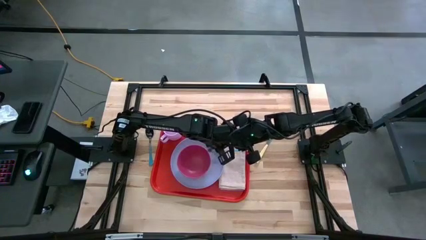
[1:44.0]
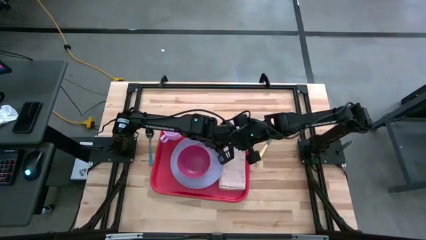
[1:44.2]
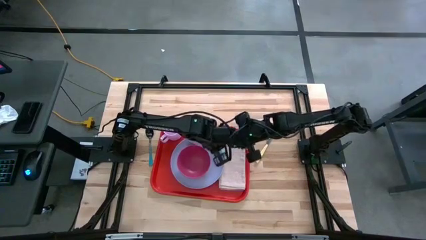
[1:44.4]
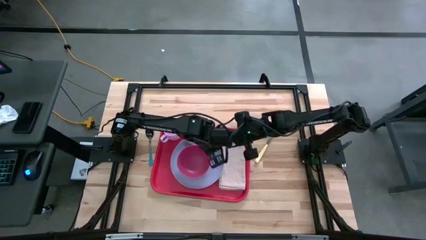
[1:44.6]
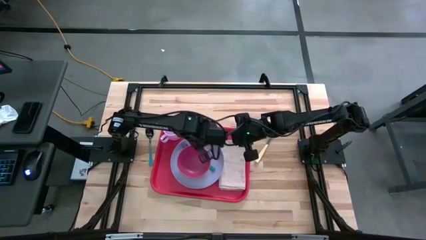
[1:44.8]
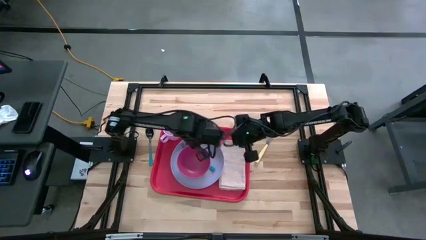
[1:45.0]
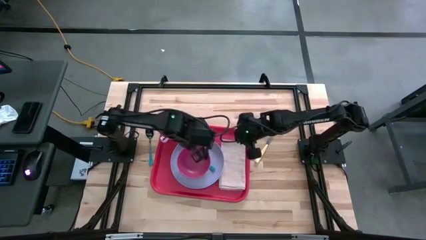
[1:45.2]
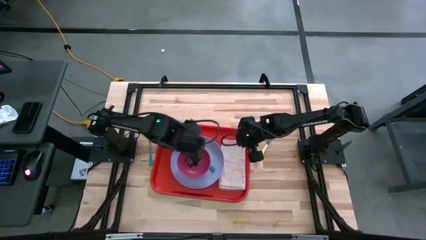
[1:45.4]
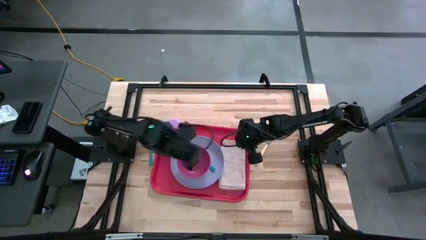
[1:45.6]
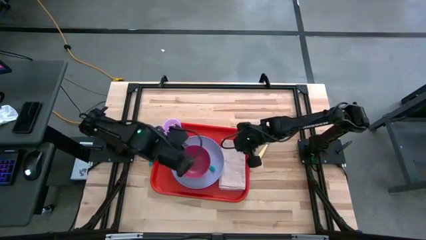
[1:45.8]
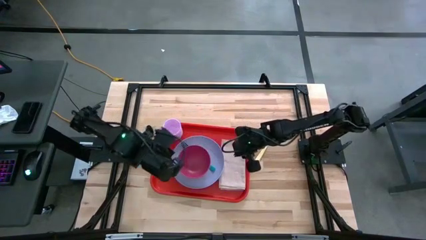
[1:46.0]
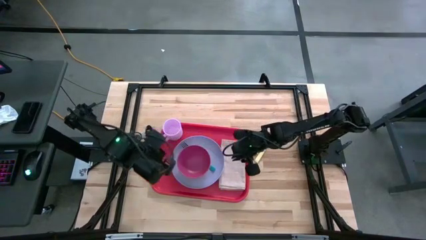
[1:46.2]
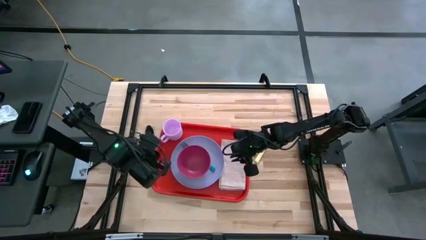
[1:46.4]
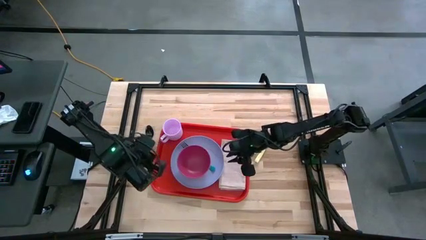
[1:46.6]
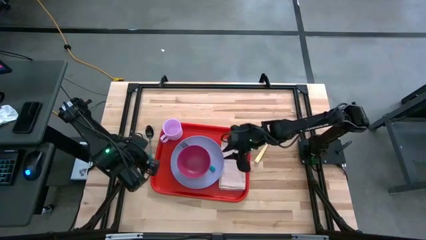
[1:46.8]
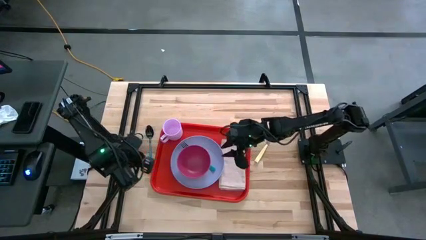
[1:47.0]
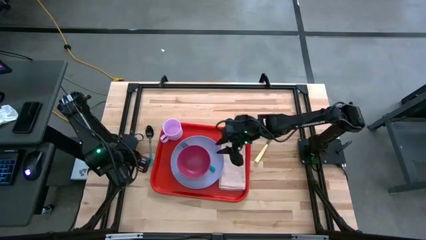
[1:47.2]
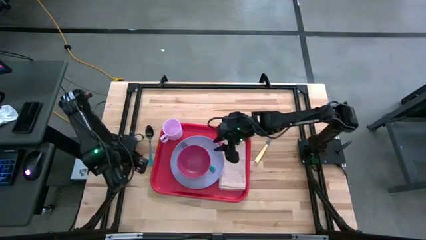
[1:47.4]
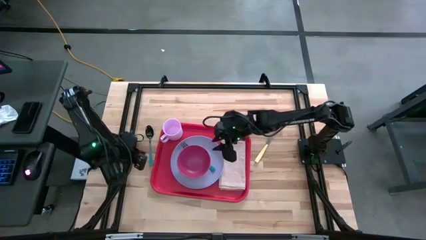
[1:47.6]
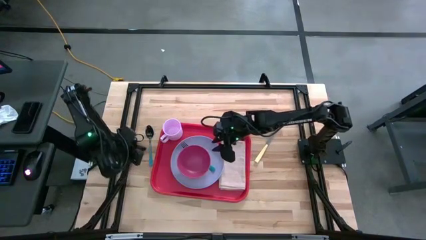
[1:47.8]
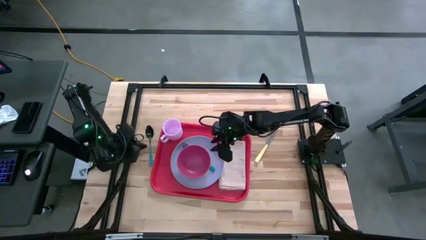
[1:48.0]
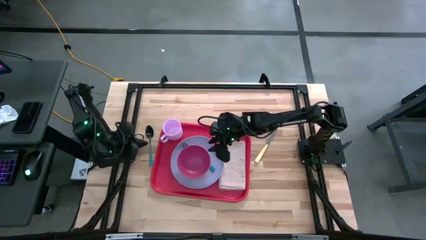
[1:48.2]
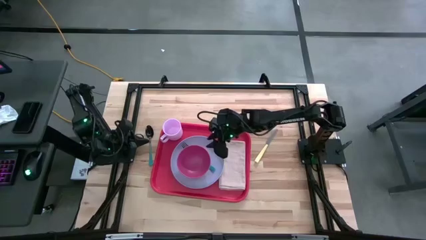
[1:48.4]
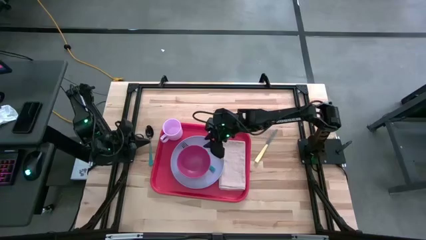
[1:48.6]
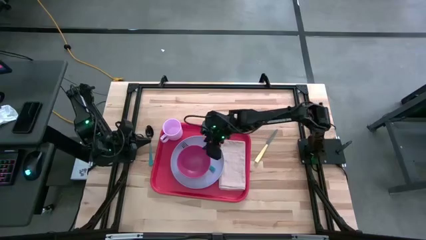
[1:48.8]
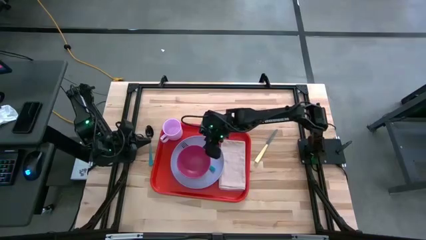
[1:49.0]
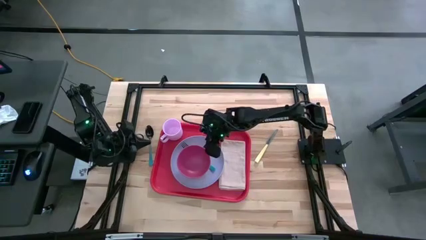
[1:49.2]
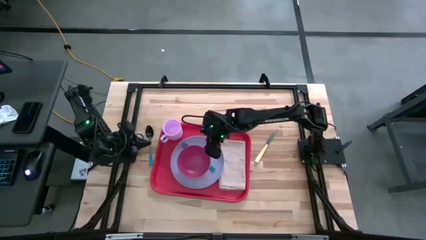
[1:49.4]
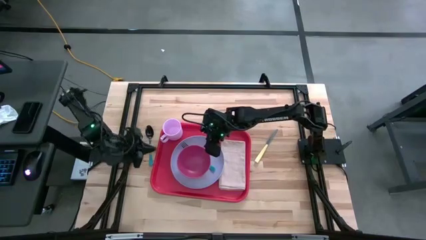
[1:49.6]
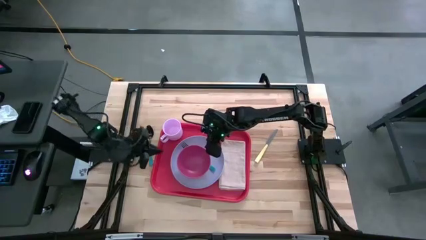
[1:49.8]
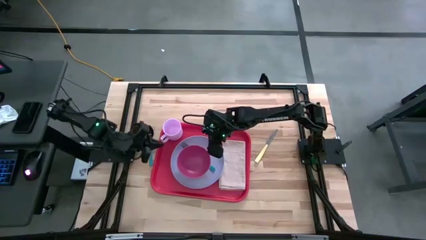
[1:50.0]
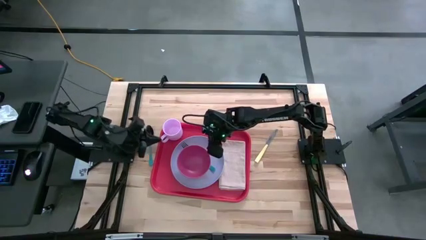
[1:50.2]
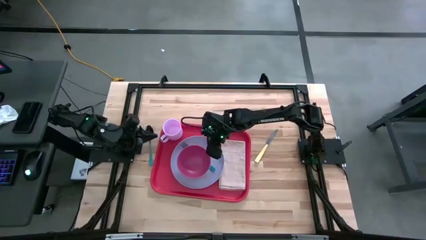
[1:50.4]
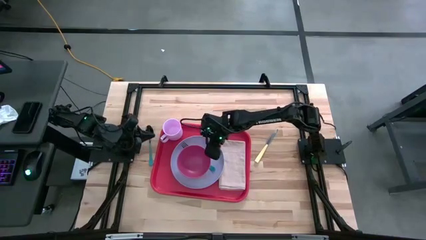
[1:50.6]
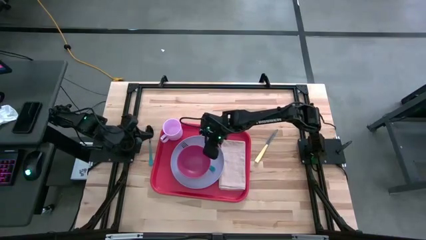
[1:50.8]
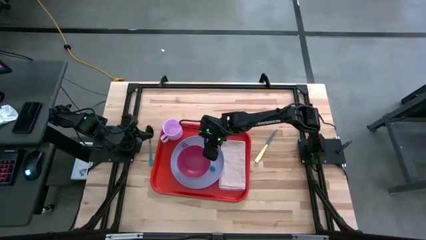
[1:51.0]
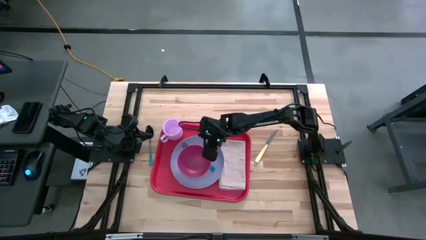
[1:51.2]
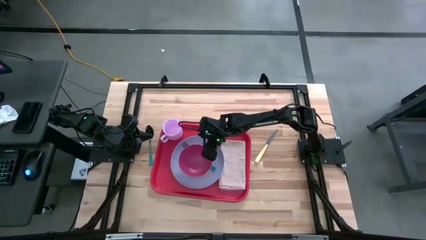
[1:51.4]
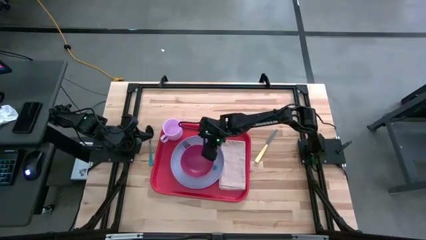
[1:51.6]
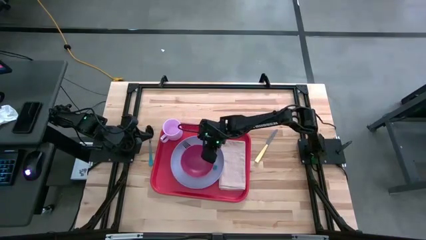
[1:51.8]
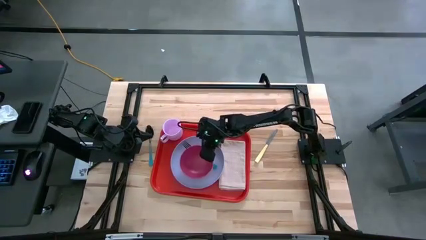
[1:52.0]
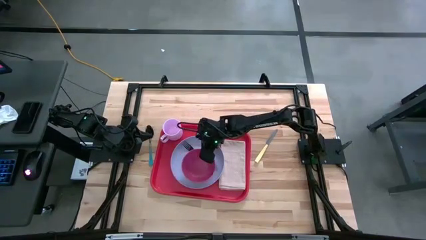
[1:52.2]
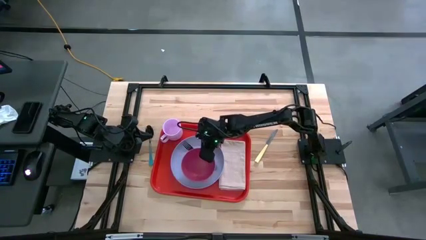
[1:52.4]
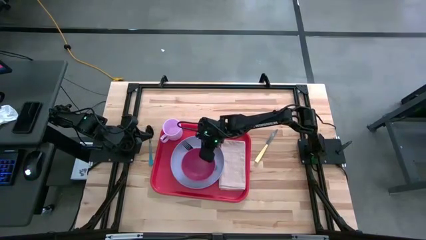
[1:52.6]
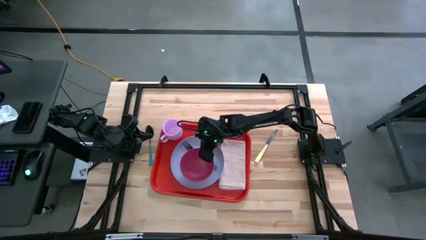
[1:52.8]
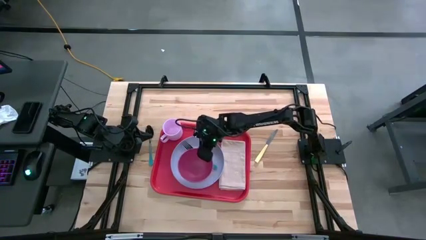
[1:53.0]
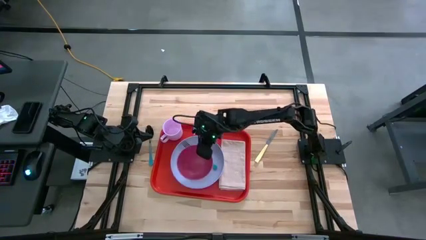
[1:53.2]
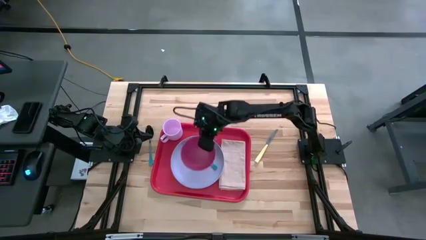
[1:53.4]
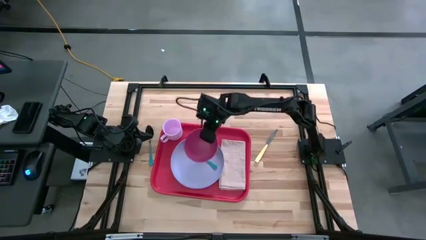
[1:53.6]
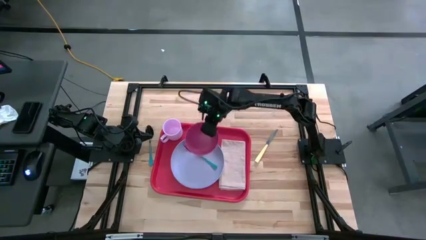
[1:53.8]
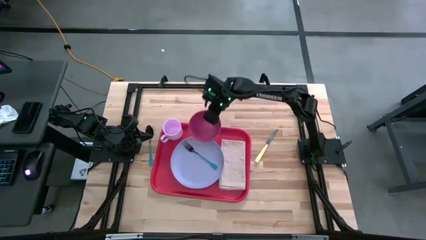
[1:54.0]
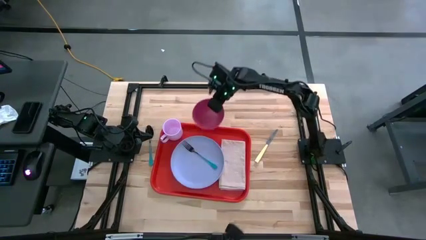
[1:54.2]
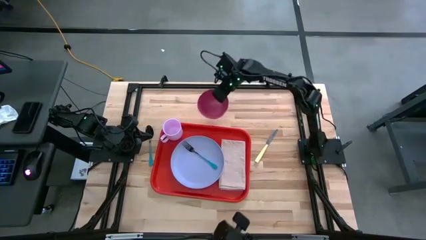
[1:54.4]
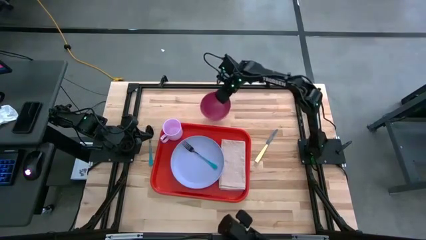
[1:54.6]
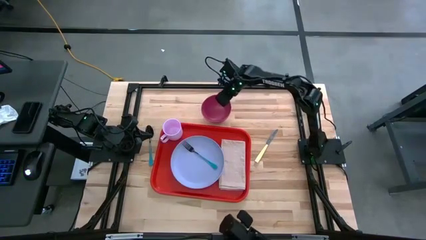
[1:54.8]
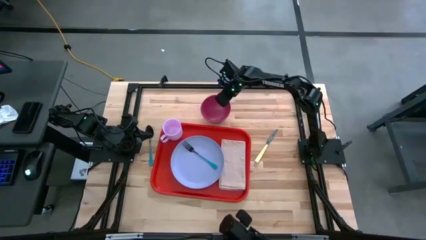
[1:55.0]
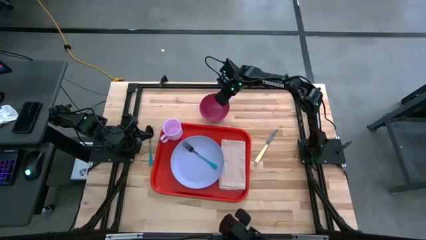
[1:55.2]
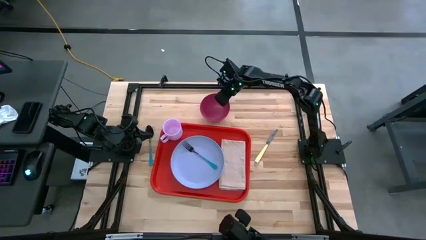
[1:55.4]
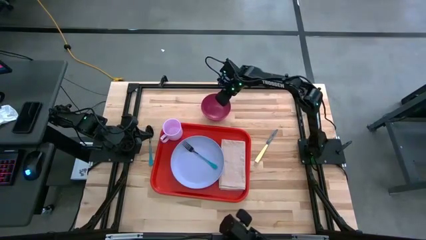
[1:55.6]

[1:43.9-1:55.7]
Task: Set up tray
Remove the red bowl from the blue plate

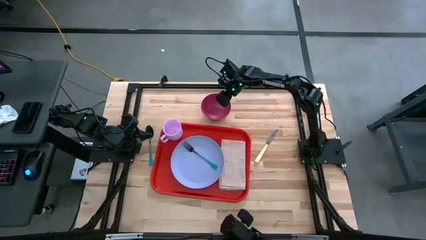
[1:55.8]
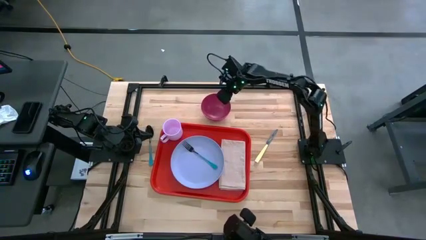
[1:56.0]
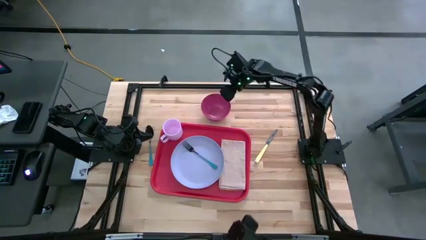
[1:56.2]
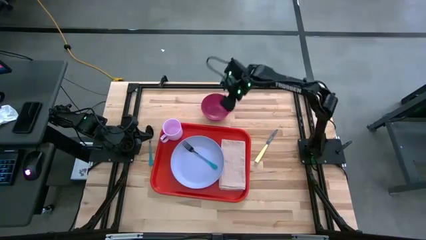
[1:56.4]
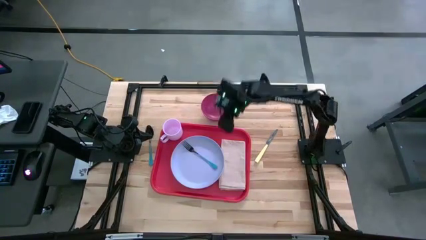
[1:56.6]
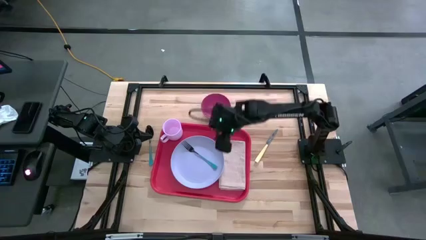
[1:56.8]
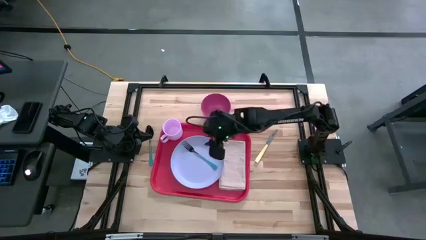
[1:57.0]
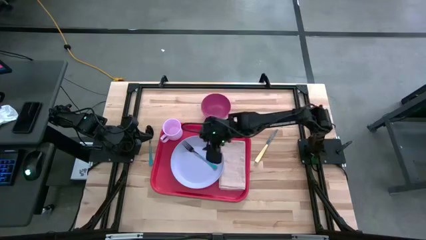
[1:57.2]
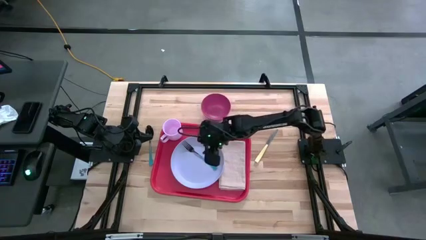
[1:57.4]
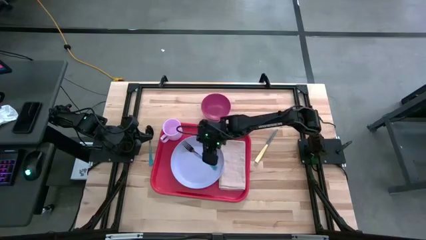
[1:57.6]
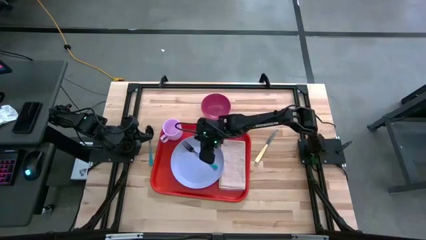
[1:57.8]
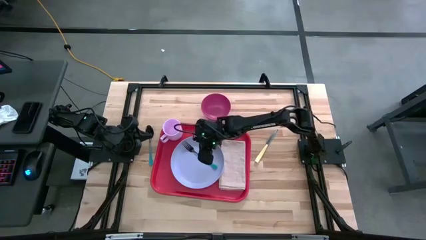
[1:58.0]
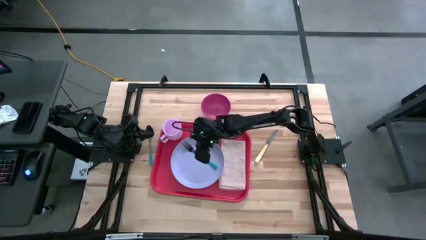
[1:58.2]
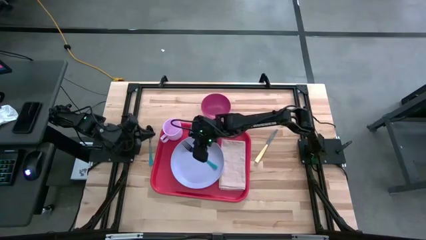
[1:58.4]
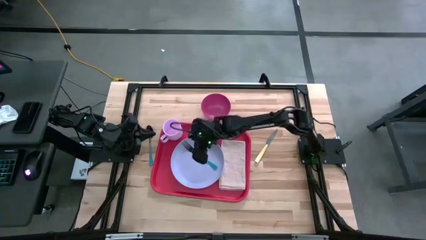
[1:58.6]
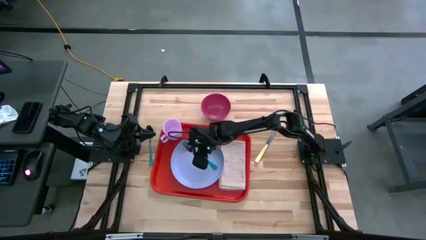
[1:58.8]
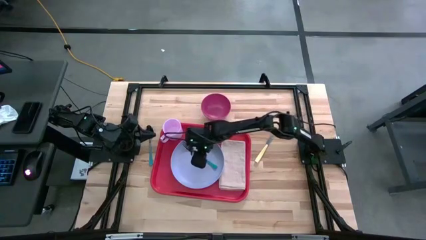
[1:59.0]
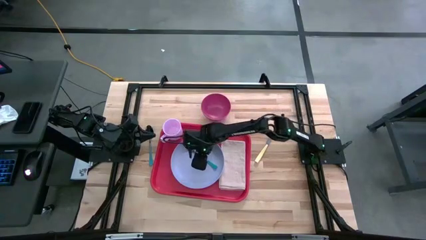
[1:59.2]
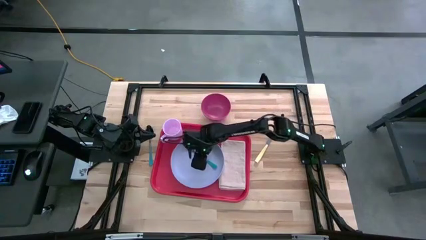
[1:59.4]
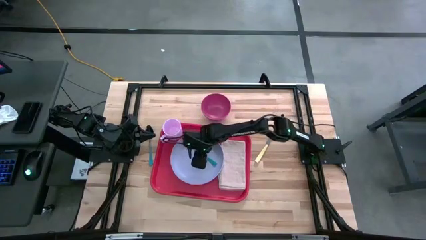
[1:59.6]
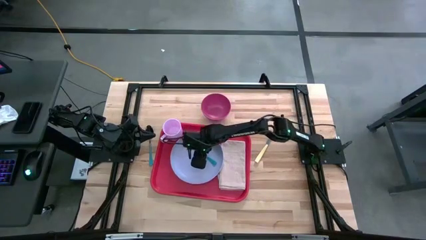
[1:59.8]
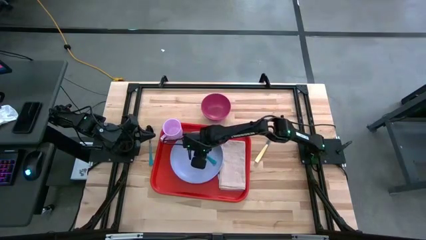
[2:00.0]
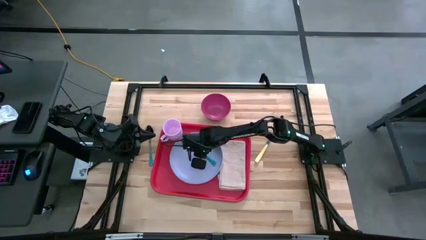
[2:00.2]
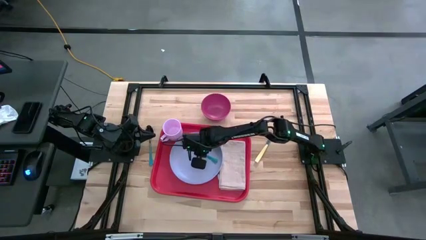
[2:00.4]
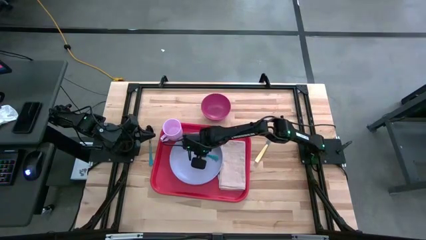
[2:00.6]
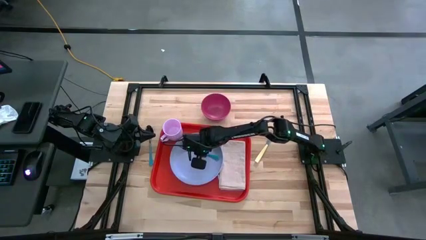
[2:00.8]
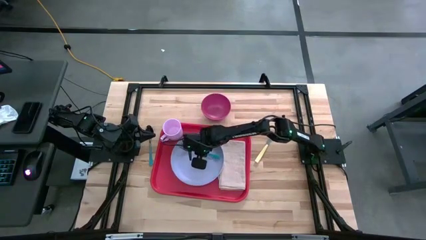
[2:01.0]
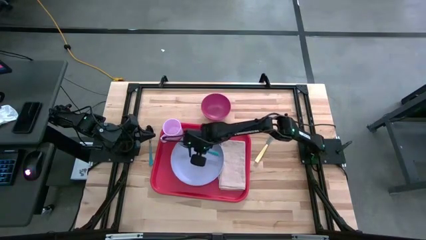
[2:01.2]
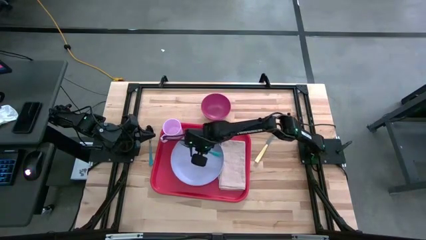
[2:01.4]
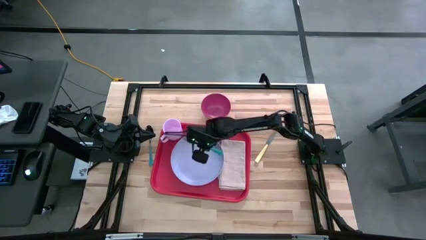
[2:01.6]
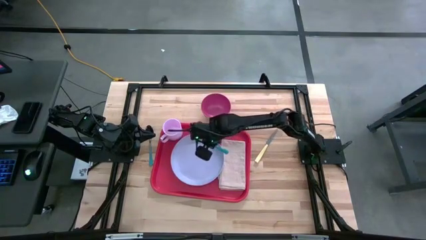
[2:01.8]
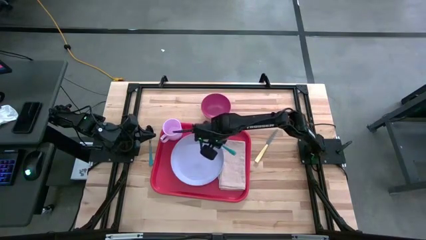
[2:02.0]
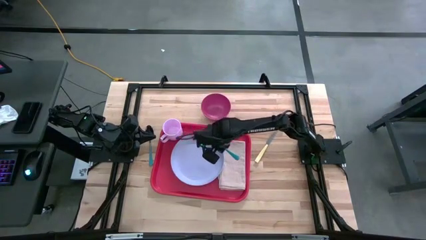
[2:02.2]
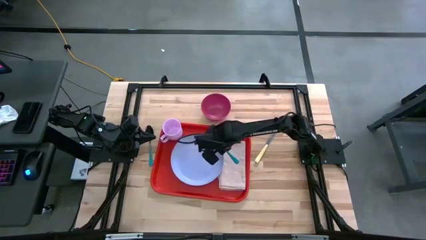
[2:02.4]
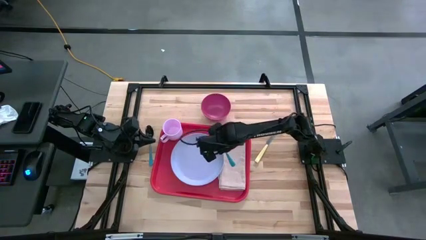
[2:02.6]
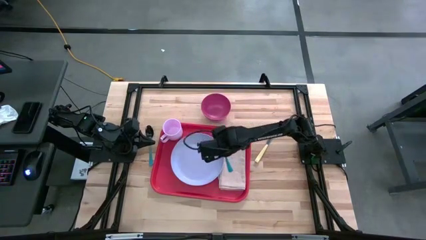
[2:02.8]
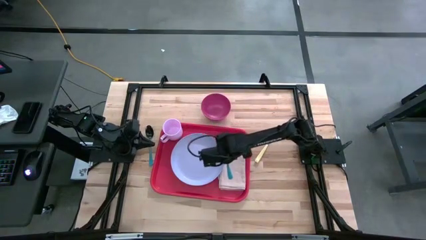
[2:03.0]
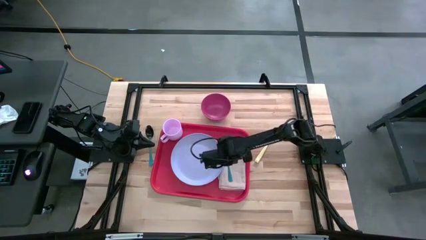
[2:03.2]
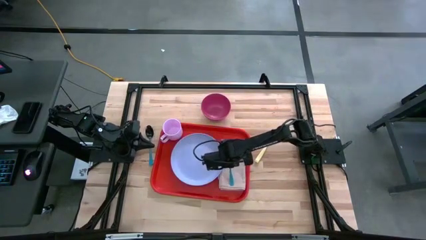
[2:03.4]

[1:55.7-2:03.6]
Put the blue fork on top of the gray napkin
